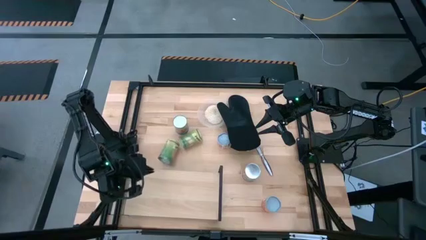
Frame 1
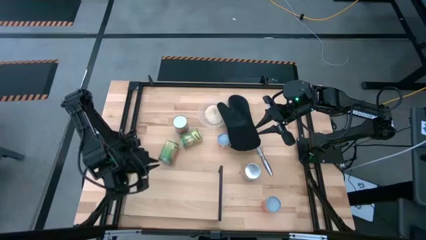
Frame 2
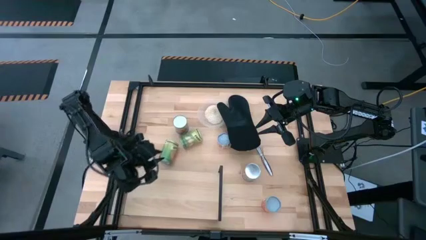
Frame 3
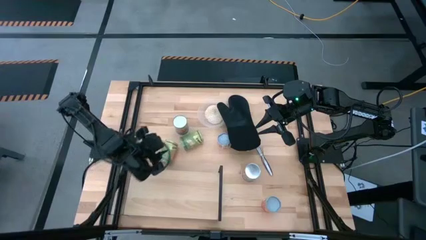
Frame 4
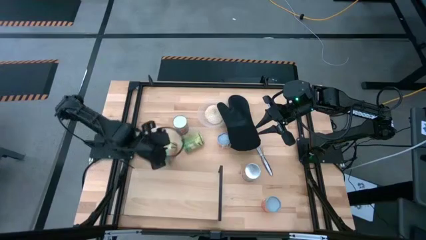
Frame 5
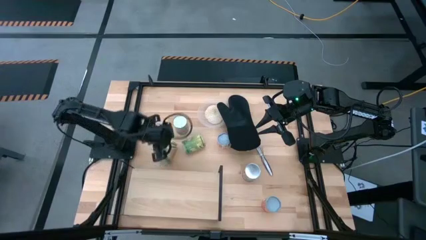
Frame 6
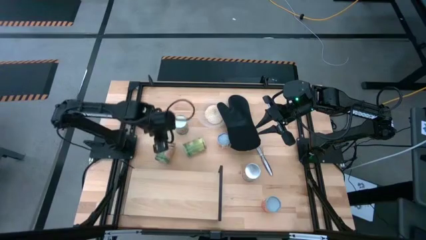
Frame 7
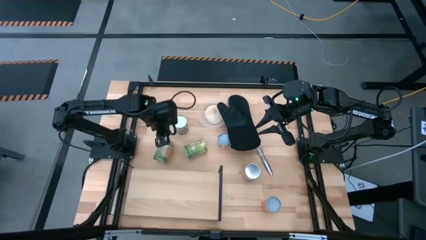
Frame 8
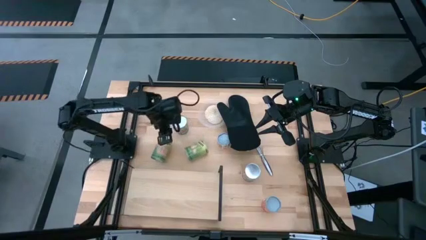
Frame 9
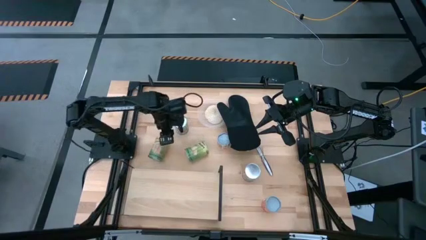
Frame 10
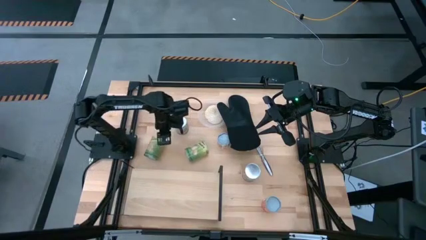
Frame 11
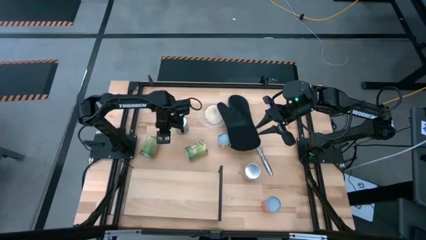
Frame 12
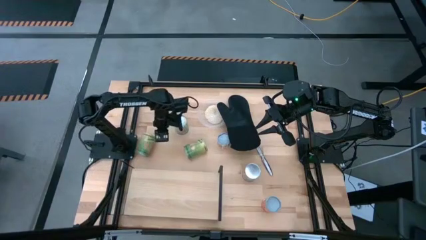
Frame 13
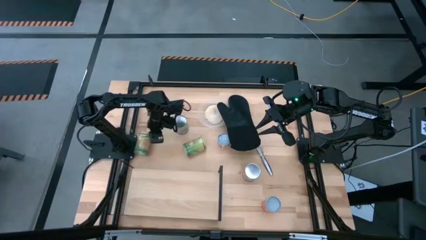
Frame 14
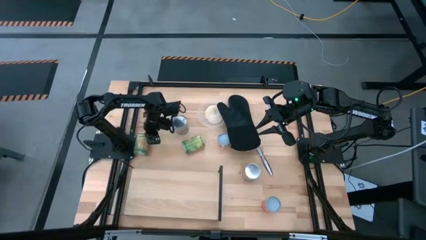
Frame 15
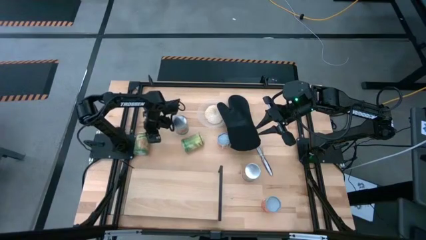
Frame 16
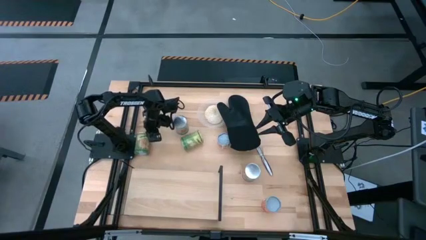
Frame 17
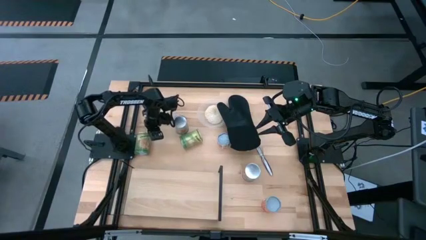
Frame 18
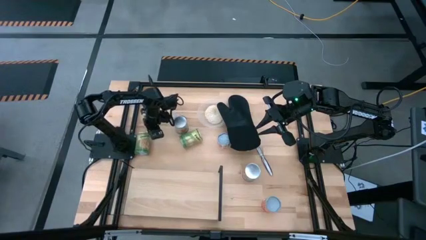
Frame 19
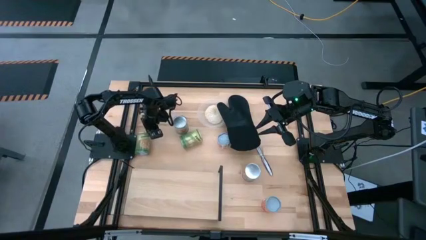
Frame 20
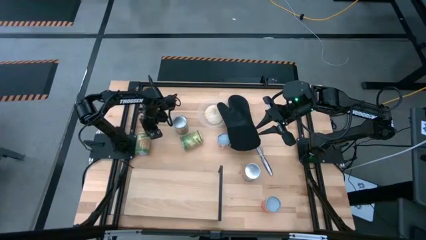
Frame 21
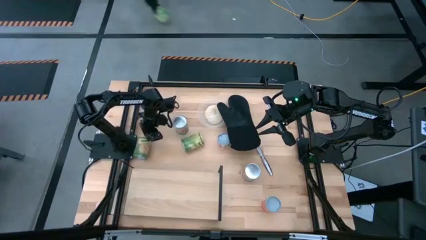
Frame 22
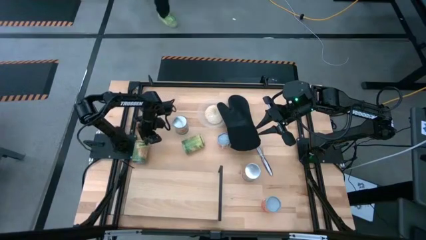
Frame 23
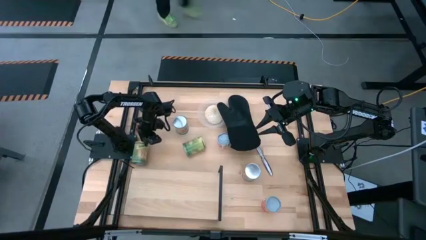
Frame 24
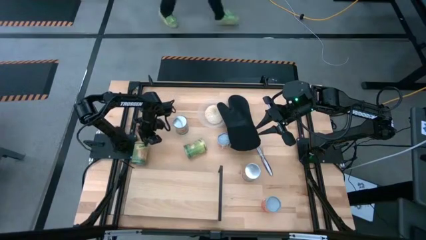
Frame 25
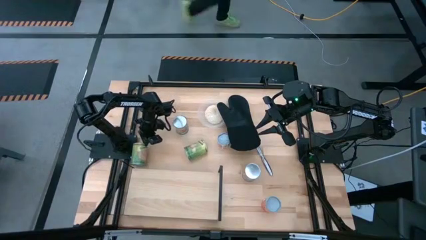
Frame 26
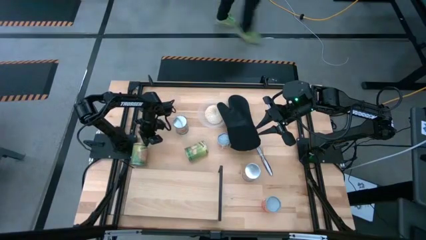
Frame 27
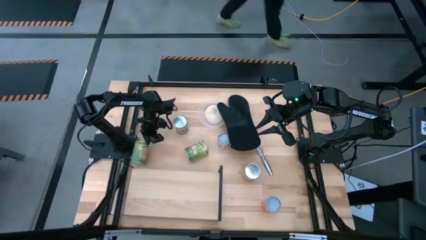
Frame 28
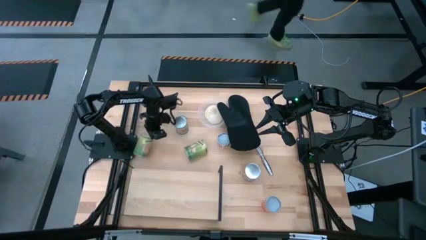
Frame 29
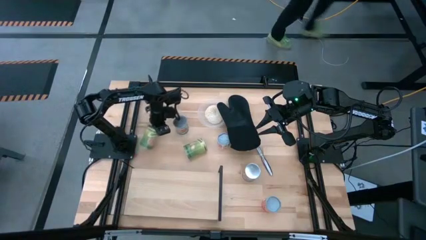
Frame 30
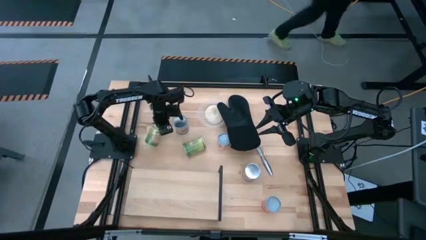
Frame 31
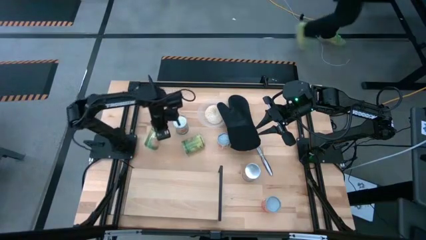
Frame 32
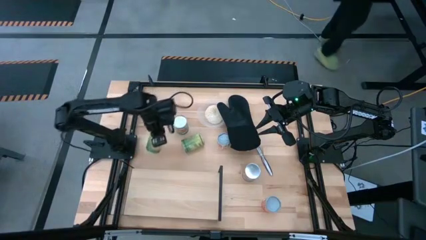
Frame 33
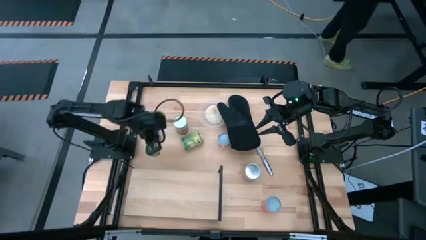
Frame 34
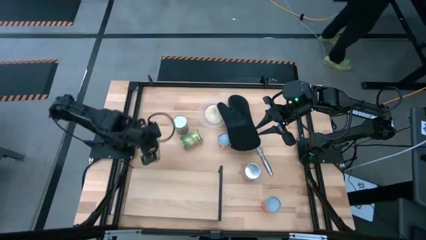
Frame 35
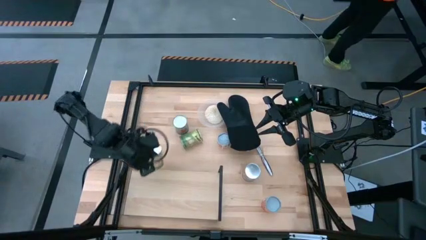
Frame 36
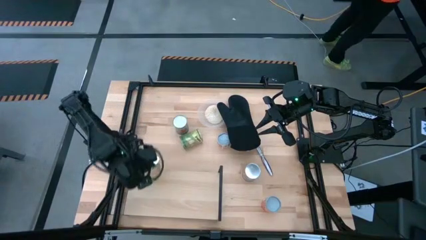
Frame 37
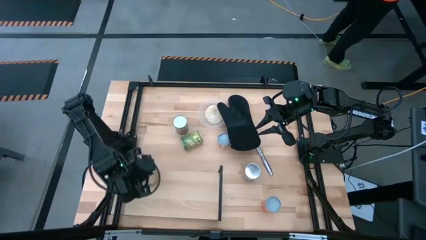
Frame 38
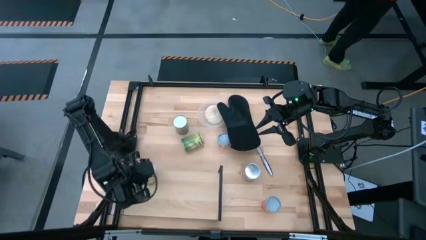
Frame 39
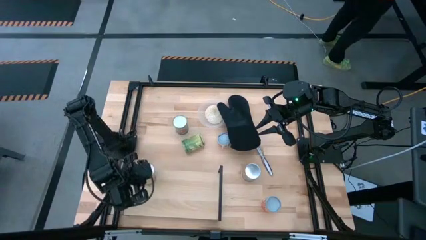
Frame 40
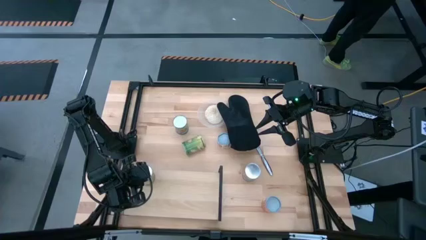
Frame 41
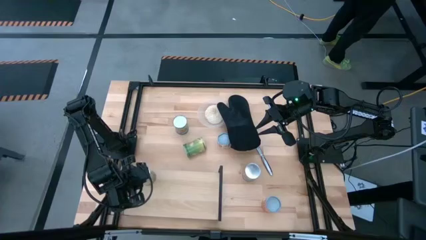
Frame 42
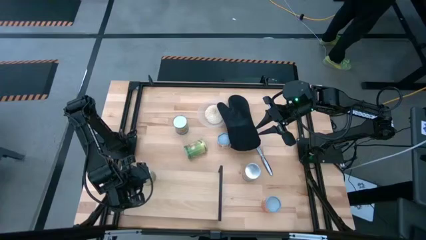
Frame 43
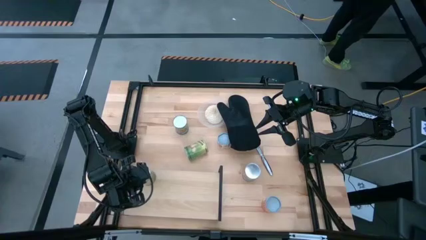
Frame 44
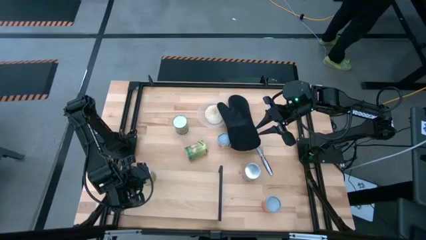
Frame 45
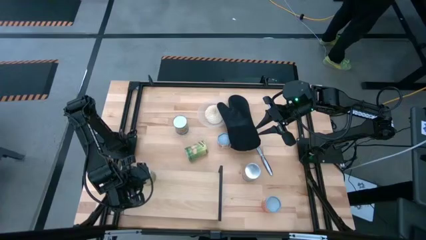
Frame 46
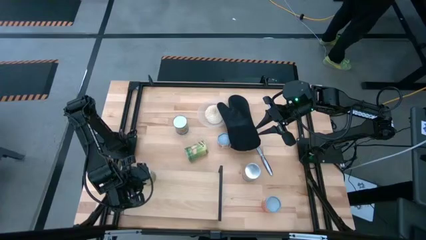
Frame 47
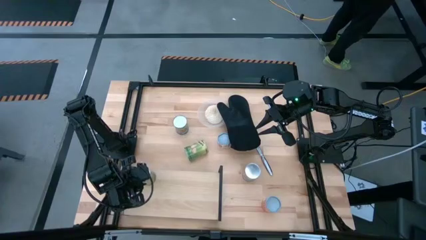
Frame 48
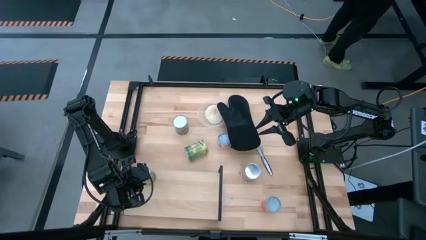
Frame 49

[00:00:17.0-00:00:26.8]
Task: Pick and place cans onto a shelf
Put the left green canned orange on the shelf
